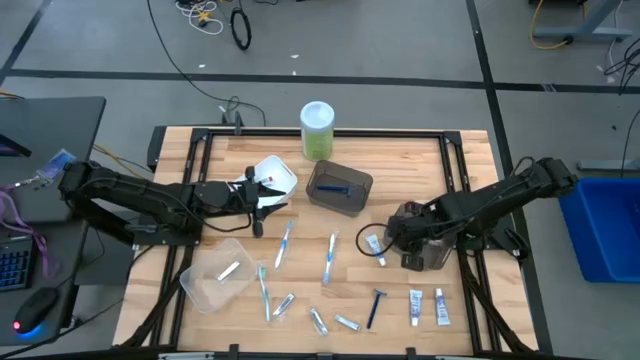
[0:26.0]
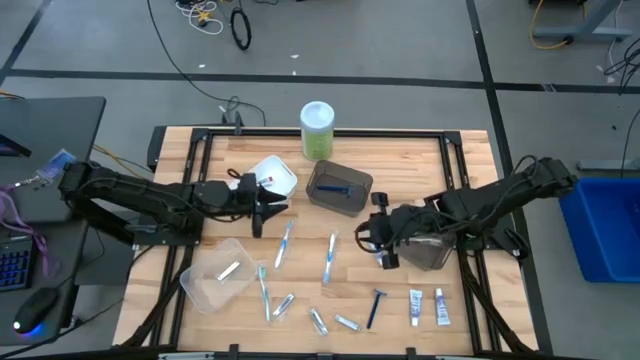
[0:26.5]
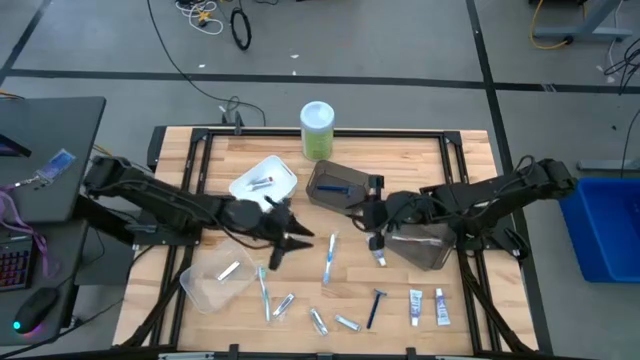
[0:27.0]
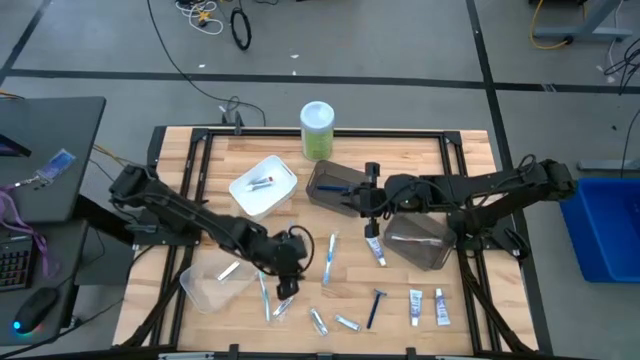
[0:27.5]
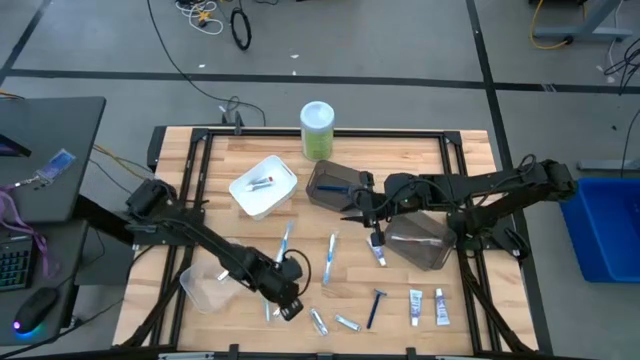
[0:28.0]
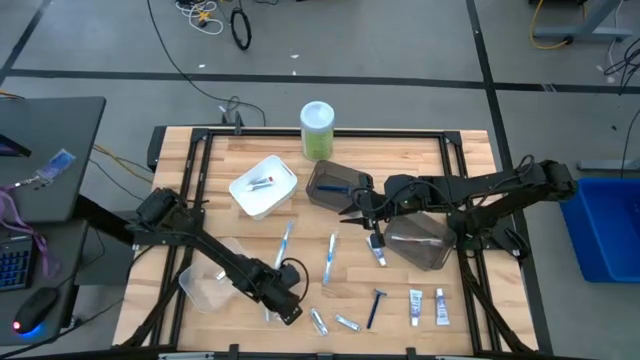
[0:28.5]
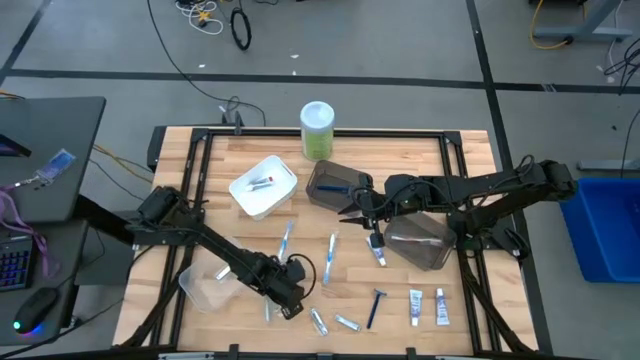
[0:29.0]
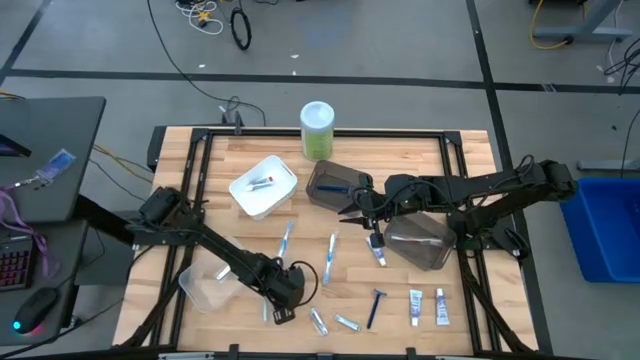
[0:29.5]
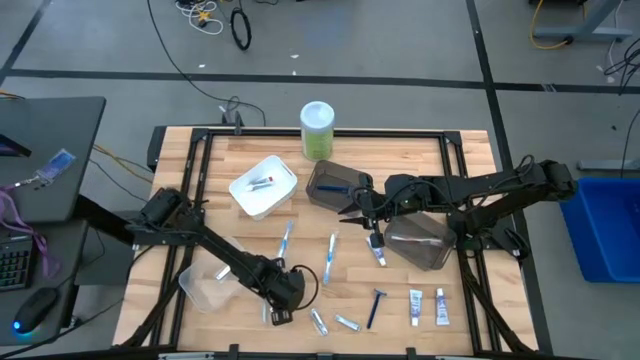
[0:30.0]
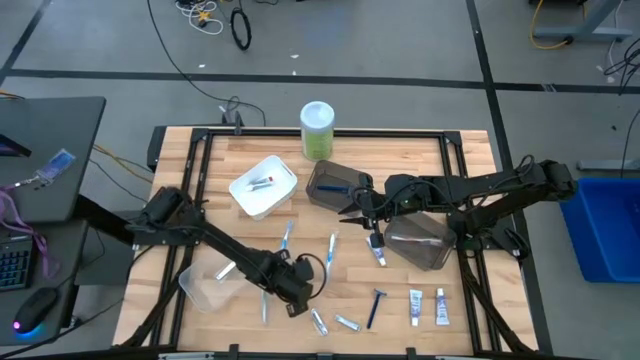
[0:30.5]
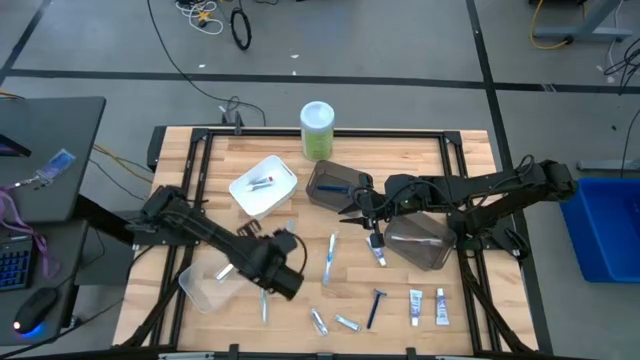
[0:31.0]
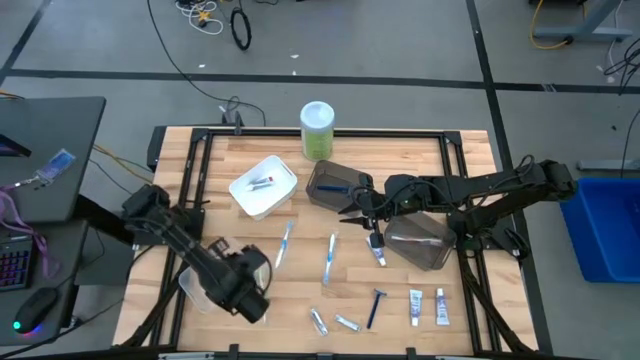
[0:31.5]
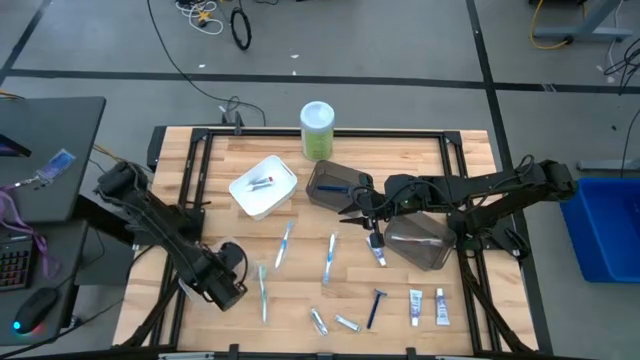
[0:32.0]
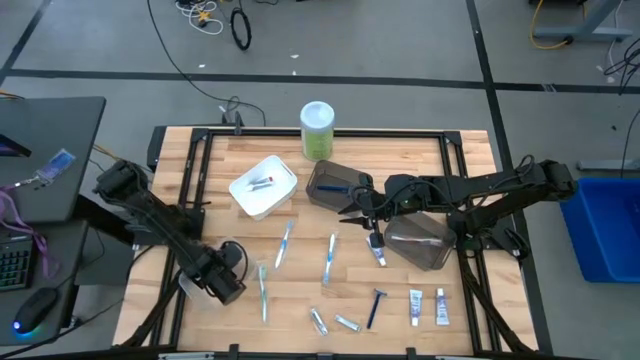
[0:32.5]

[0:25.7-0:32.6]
Task: Pick & Place Travel size toiletries
Put the nail cutter into the transparent bin

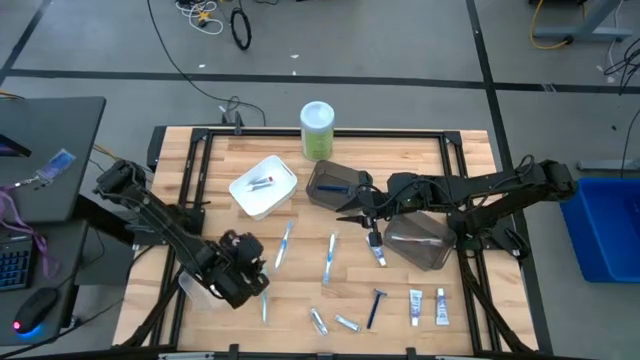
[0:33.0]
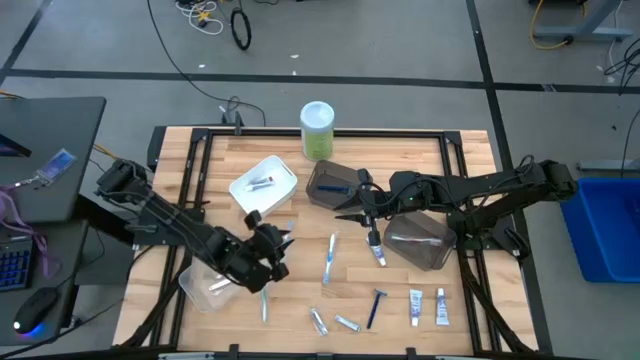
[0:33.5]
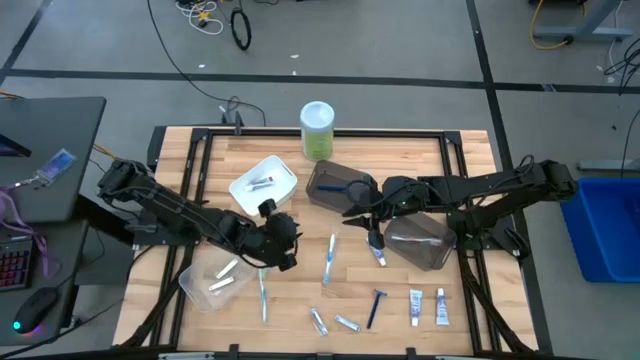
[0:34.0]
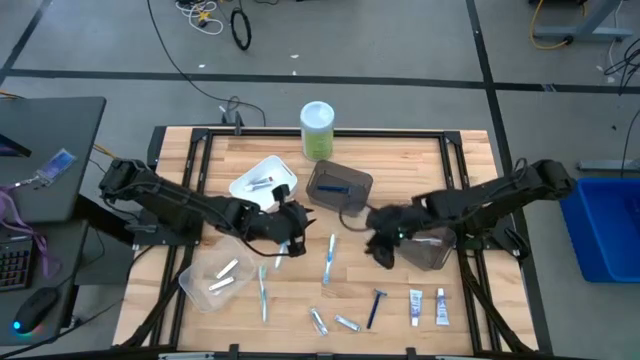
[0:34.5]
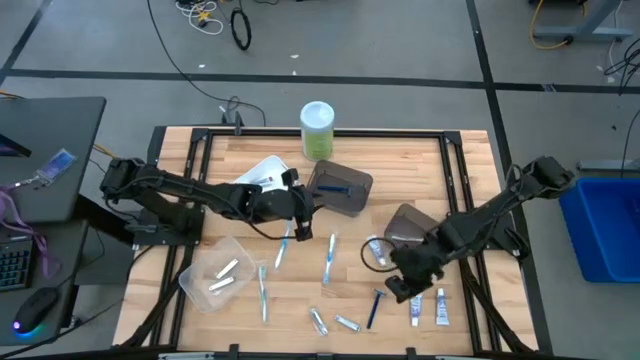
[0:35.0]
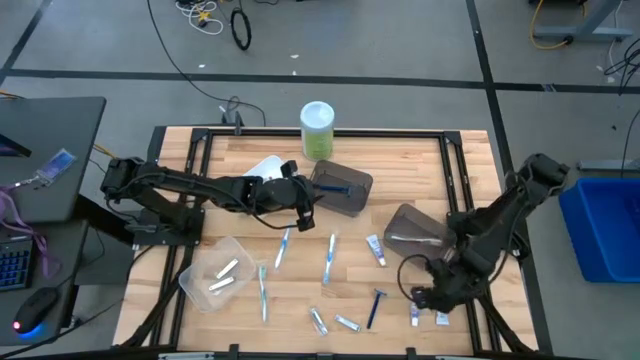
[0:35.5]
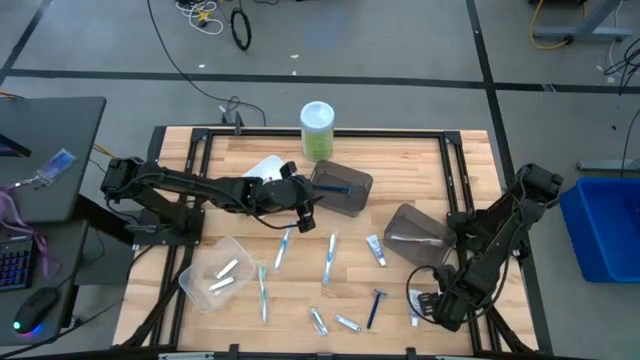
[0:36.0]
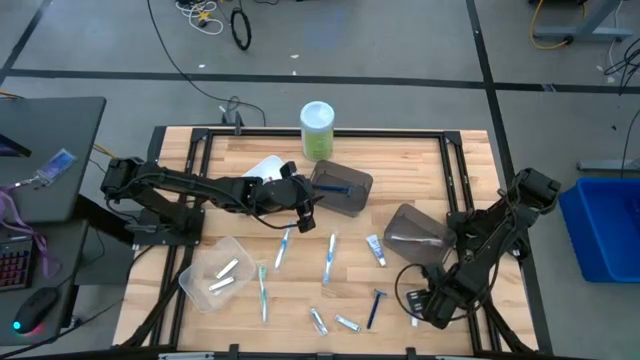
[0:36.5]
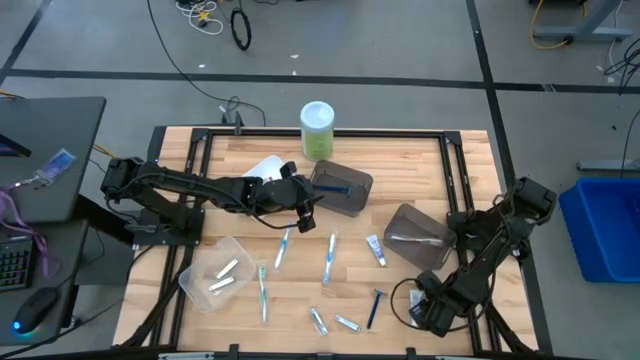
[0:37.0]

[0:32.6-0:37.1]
Put the toothpaste into the white bin

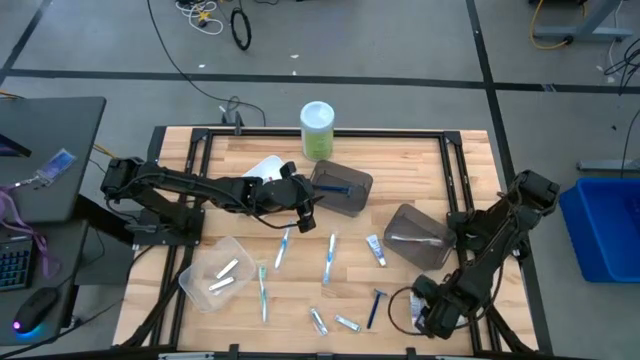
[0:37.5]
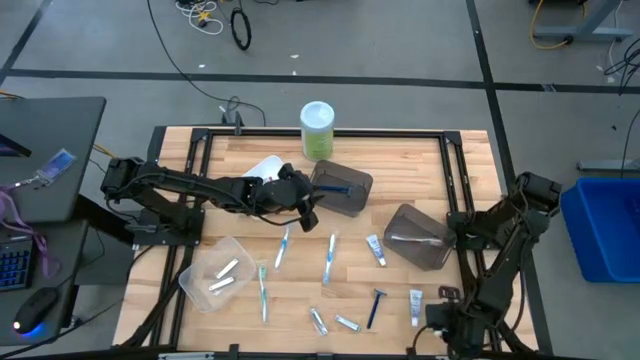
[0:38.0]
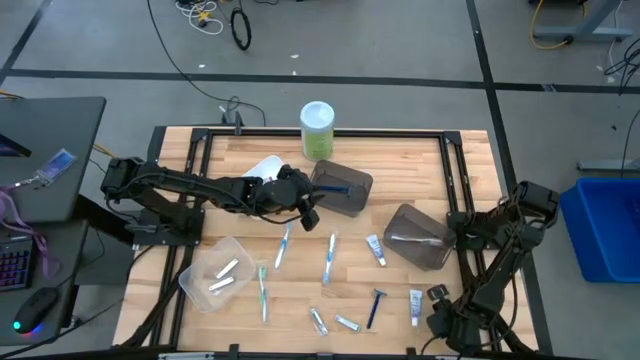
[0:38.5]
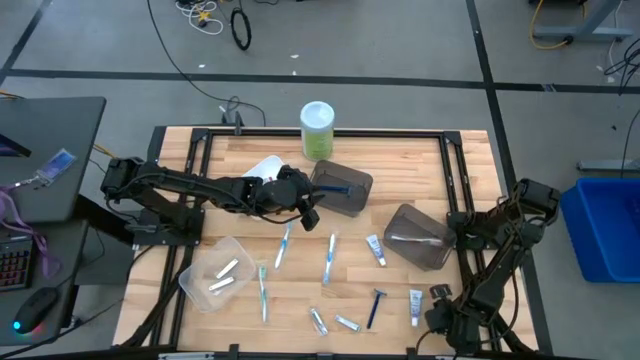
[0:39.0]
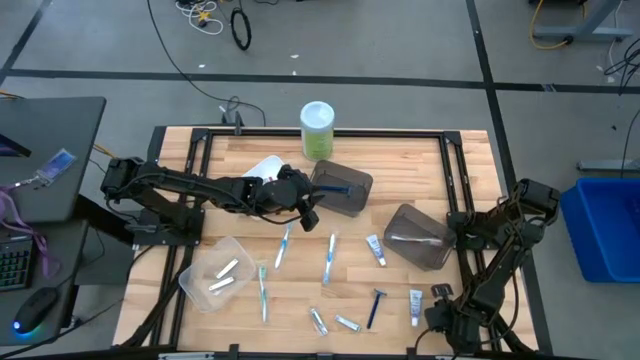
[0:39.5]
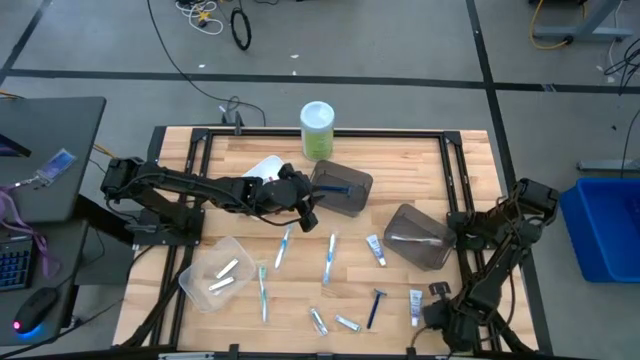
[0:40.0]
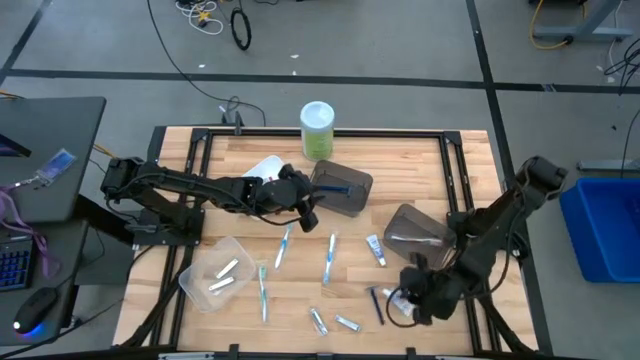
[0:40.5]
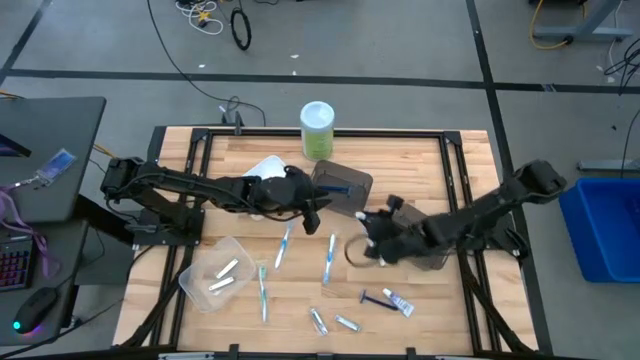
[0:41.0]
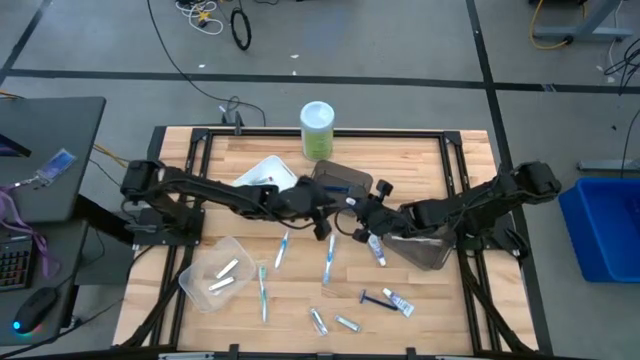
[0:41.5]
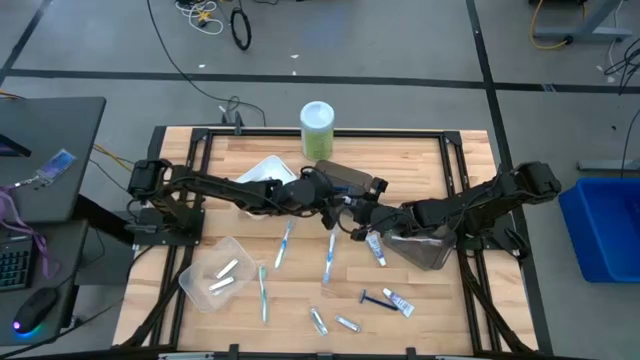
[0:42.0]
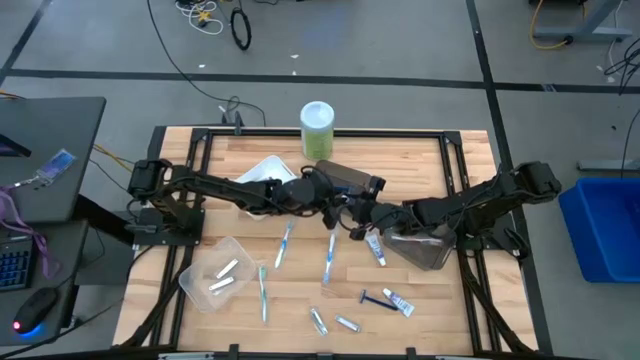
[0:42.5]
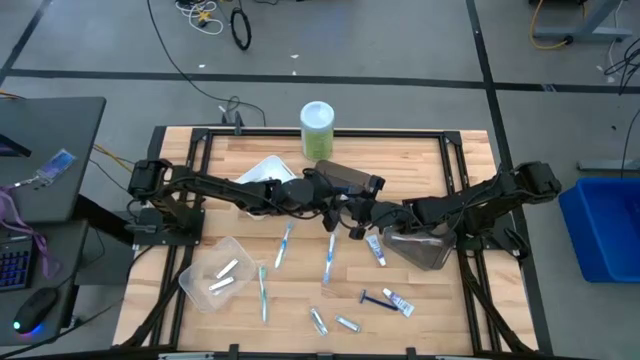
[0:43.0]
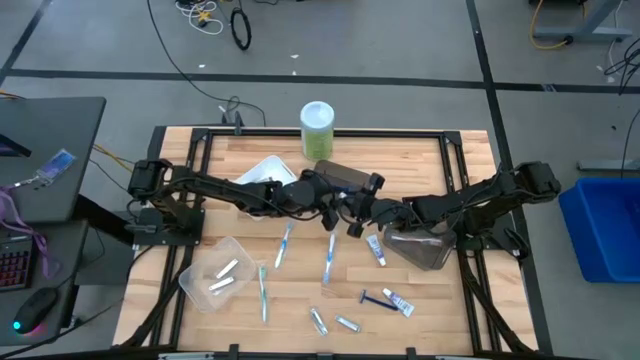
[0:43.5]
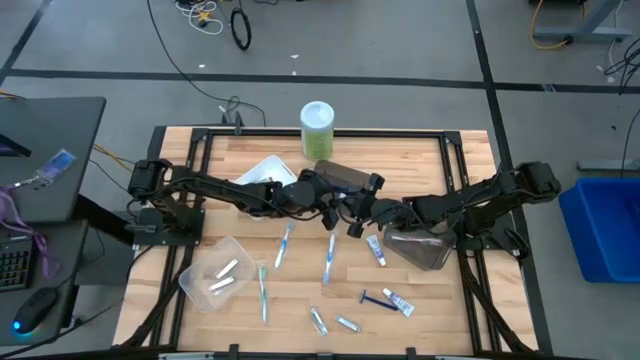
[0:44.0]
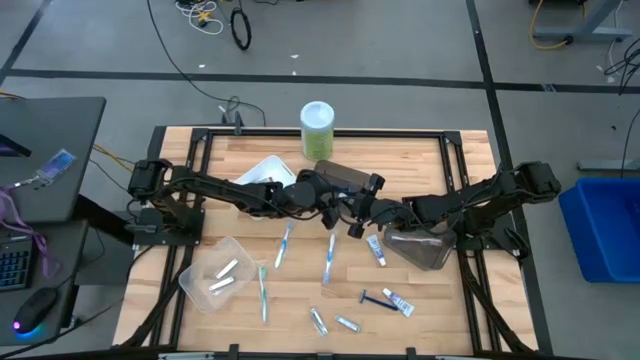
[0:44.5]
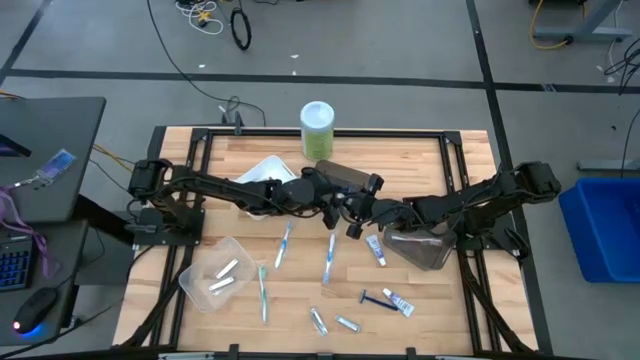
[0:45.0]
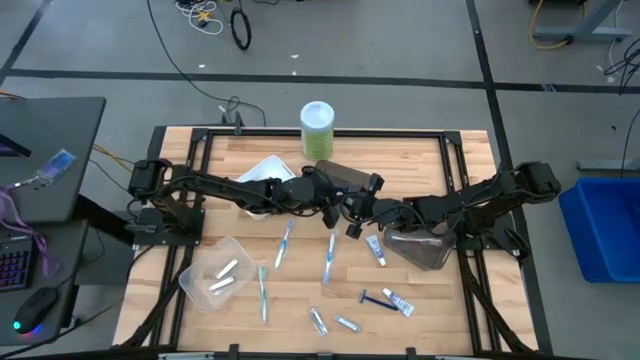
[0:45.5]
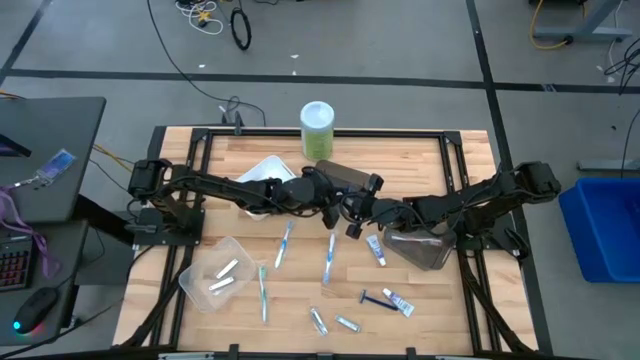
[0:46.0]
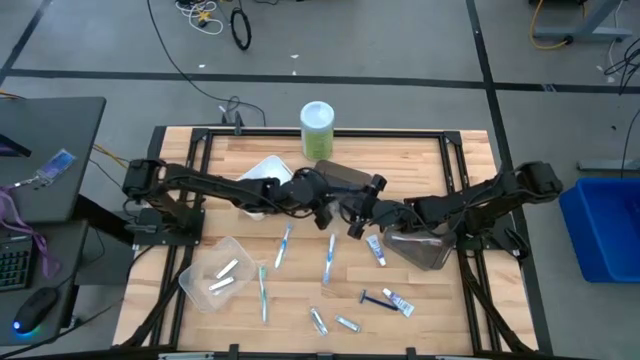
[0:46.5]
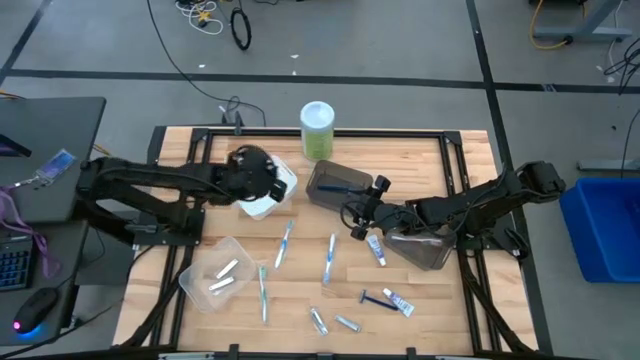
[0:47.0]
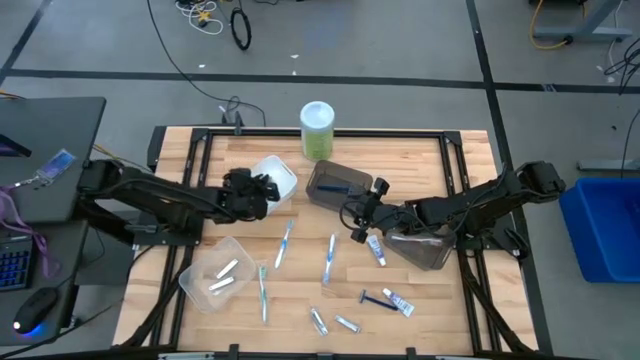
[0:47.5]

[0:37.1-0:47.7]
Put the toothpaste into the white bin
